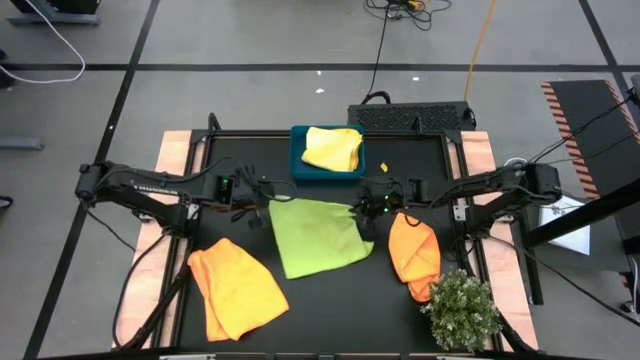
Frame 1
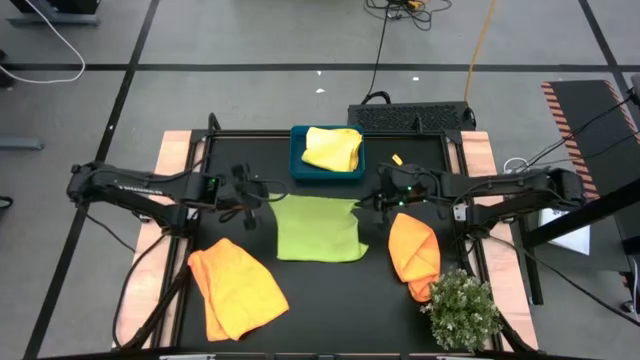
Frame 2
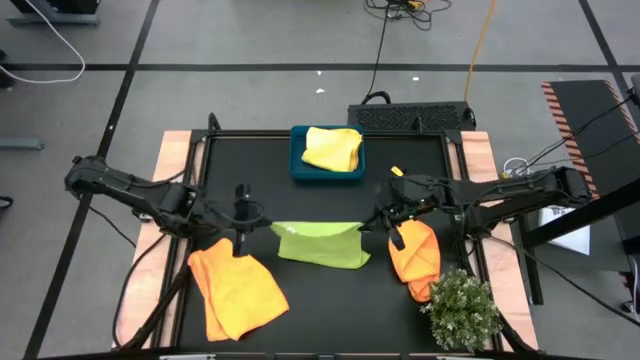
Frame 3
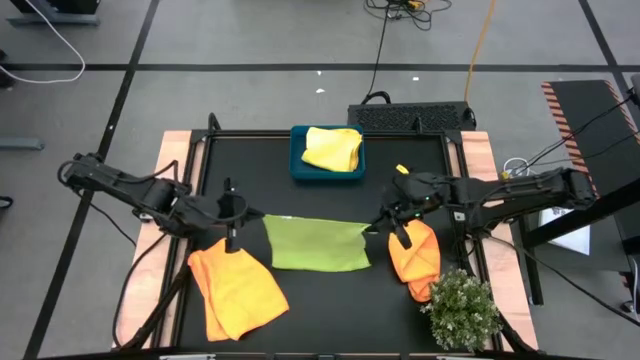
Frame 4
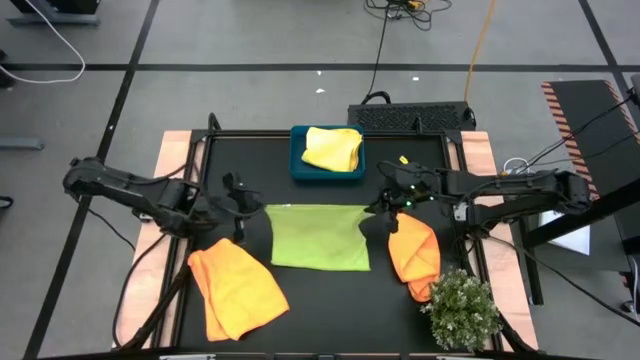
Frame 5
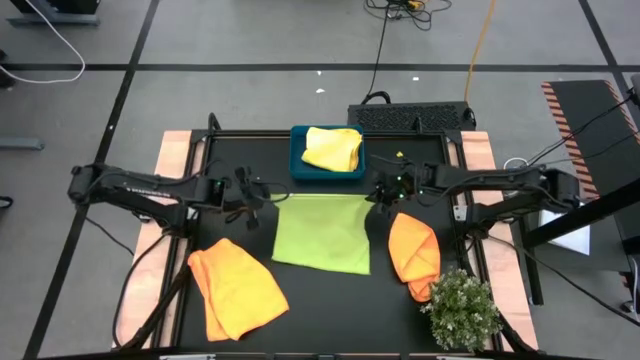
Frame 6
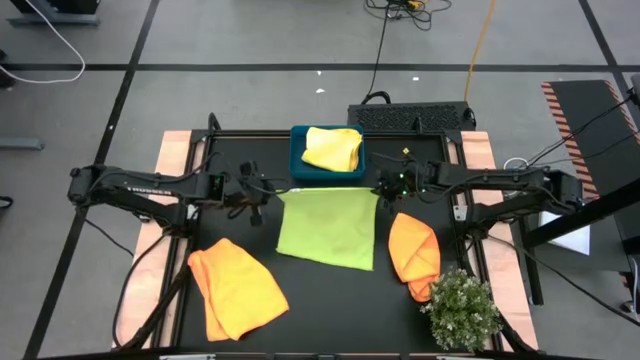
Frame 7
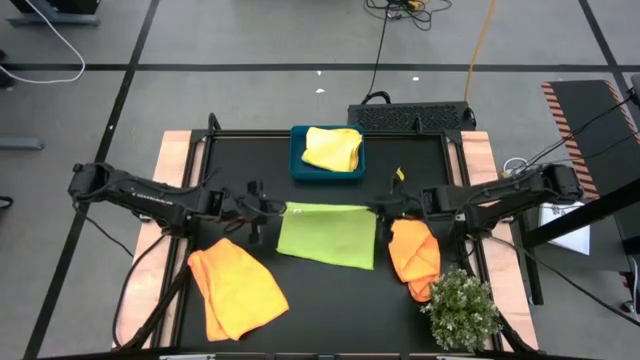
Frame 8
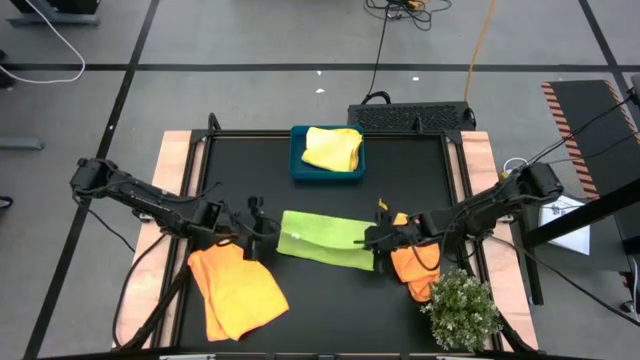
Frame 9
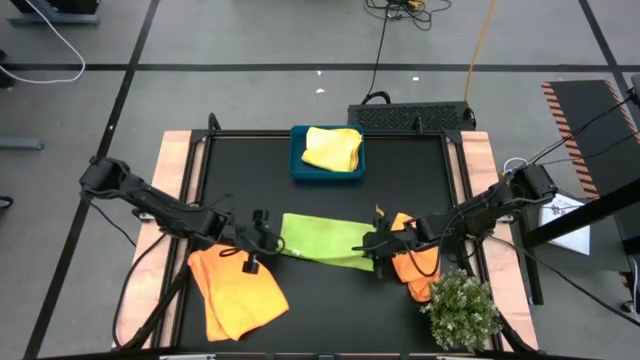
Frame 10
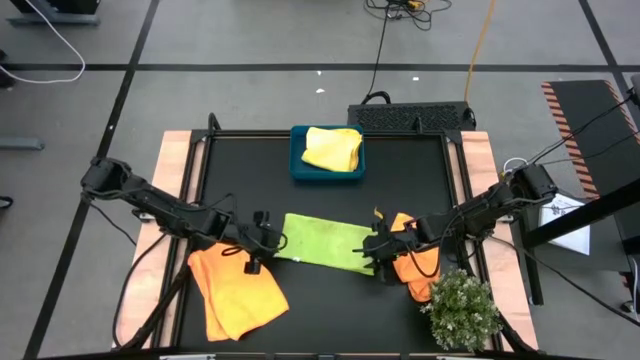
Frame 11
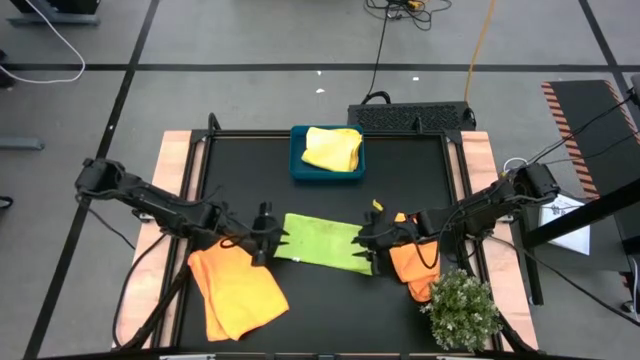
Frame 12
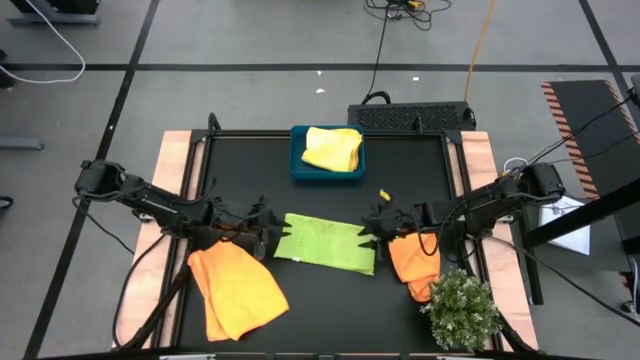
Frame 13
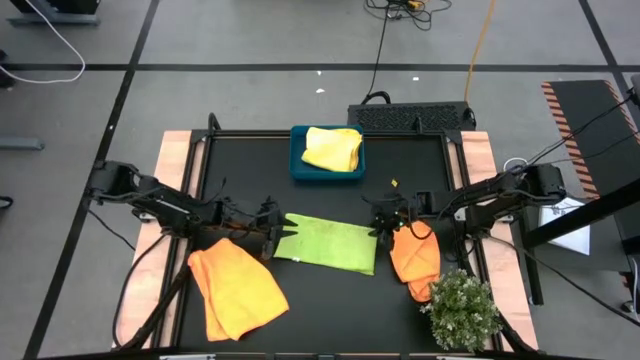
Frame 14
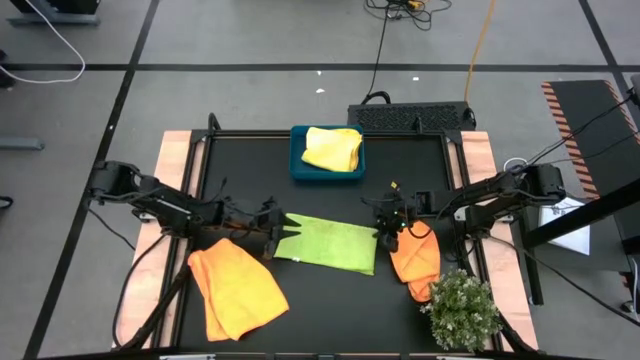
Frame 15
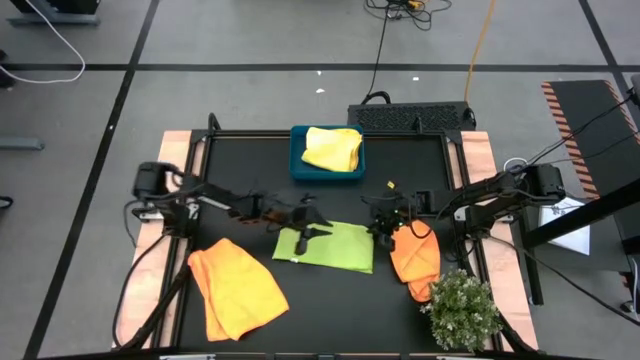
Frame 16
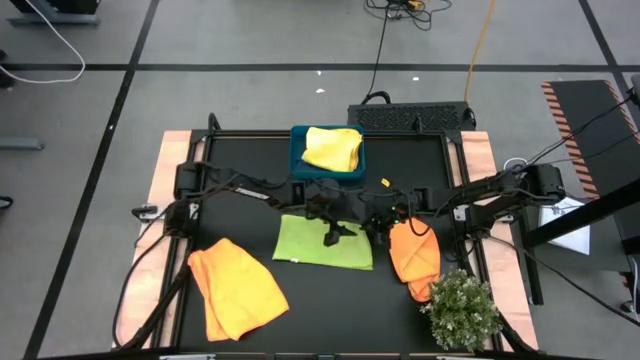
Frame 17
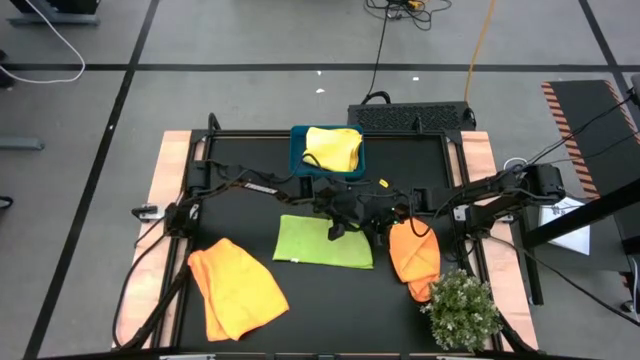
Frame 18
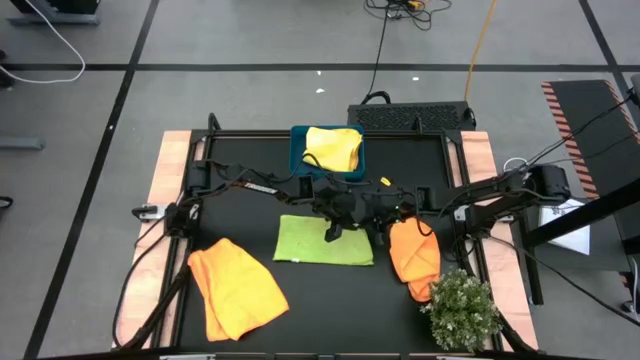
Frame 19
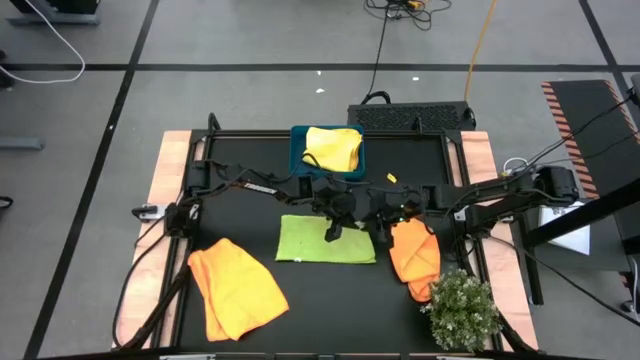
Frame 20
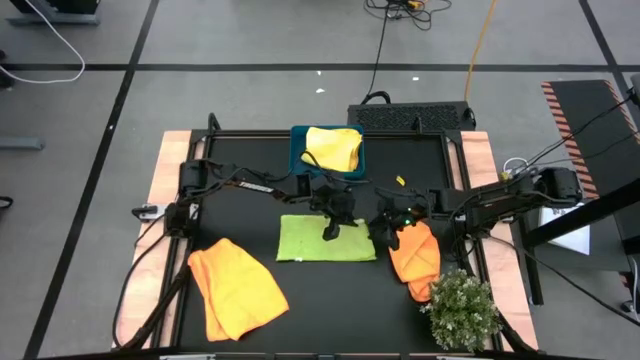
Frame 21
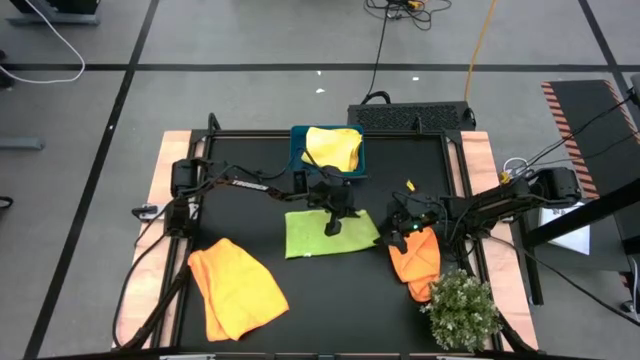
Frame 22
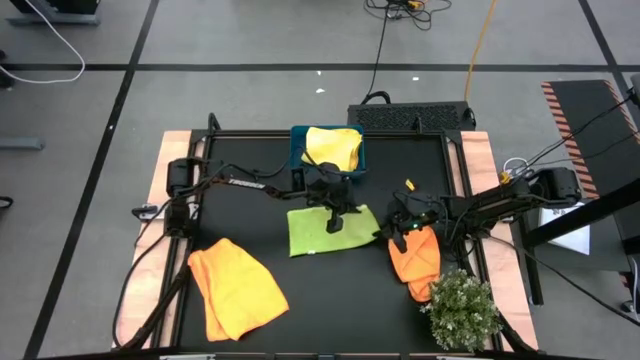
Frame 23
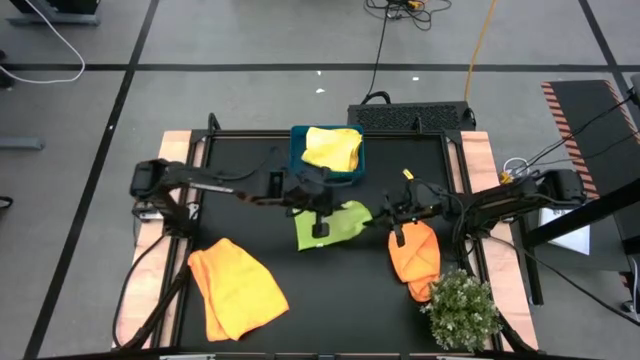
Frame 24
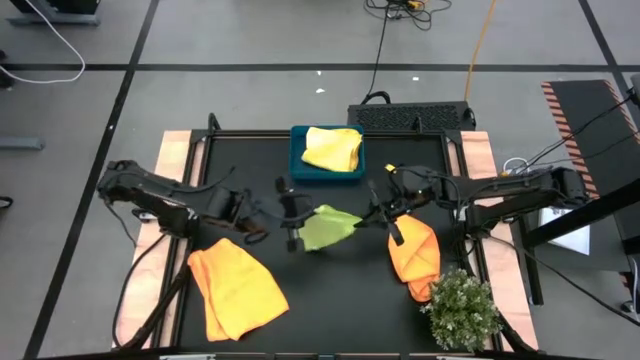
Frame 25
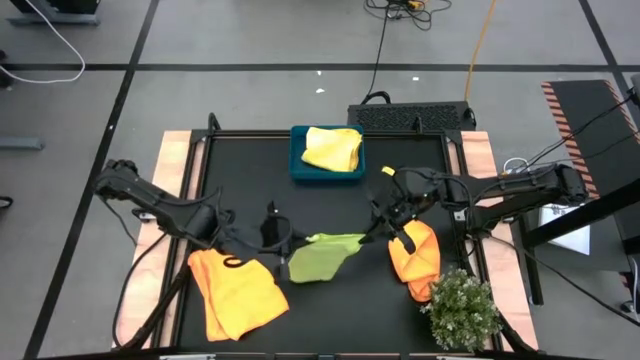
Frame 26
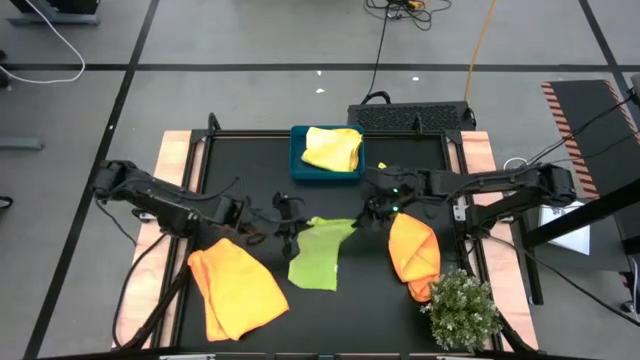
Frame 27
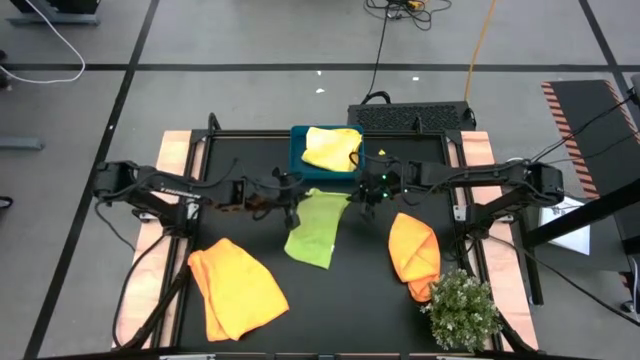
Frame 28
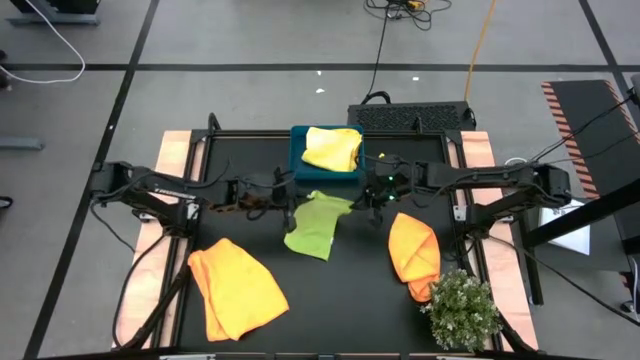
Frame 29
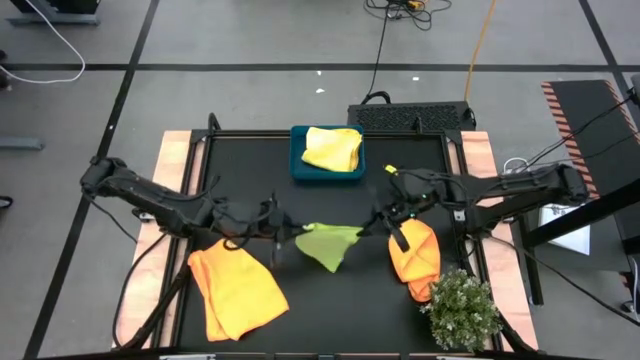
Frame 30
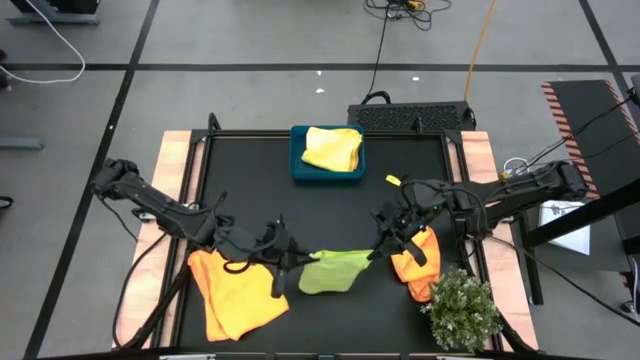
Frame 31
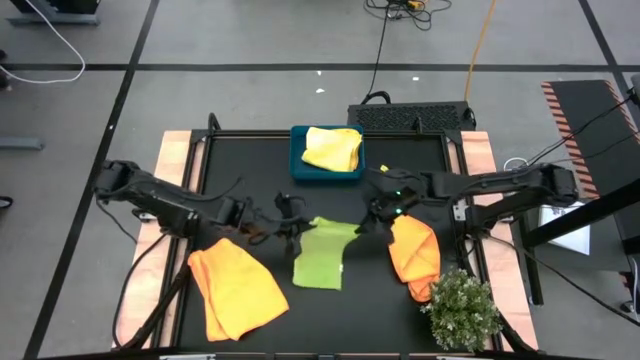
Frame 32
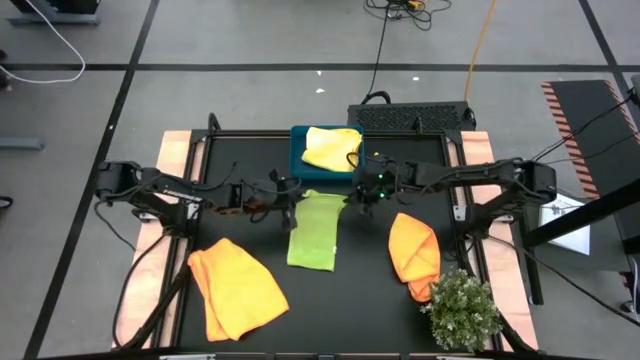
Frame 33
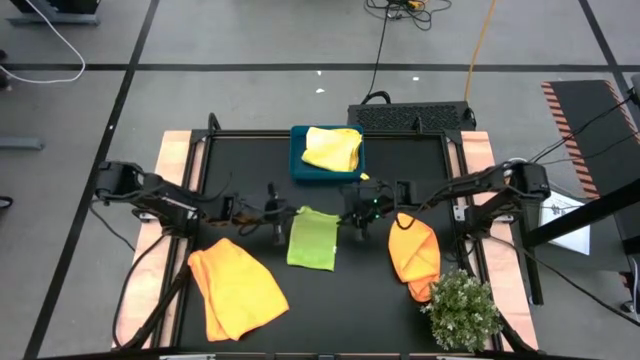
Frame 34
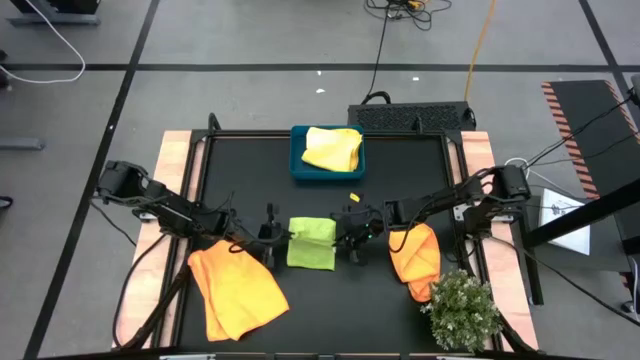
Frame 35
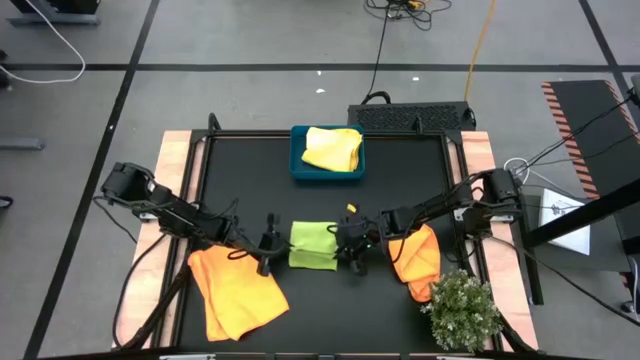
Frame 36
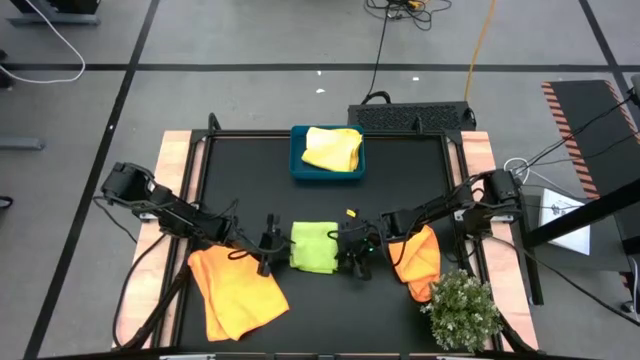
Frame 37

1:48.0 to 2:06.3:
Task: Fold microfiber towels
Fold the green microfiber towel

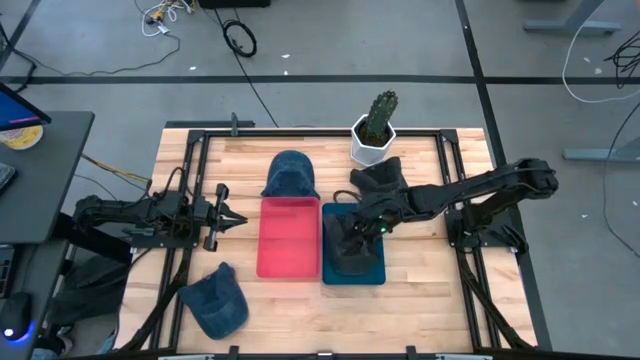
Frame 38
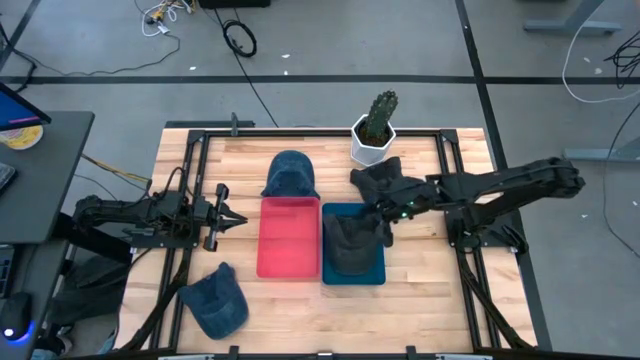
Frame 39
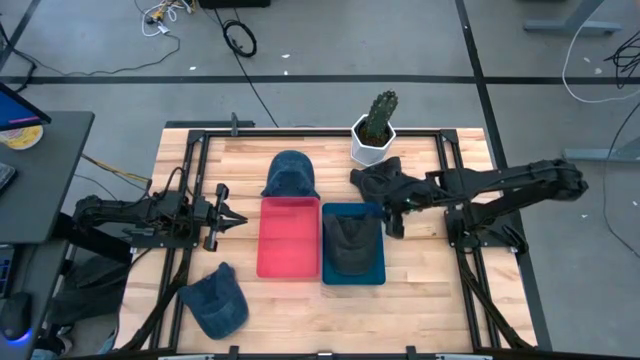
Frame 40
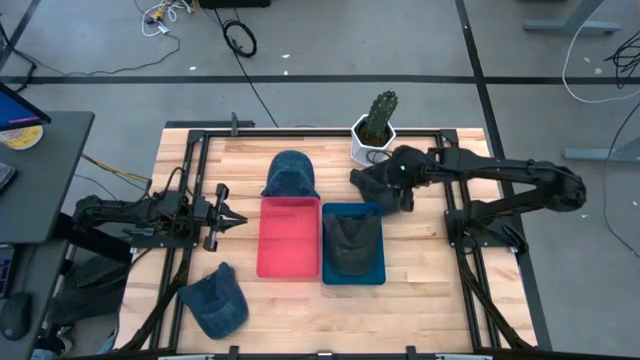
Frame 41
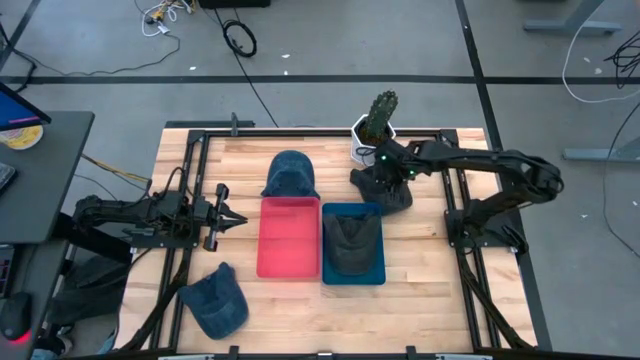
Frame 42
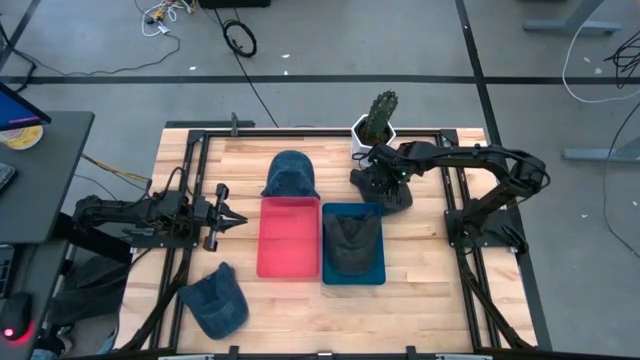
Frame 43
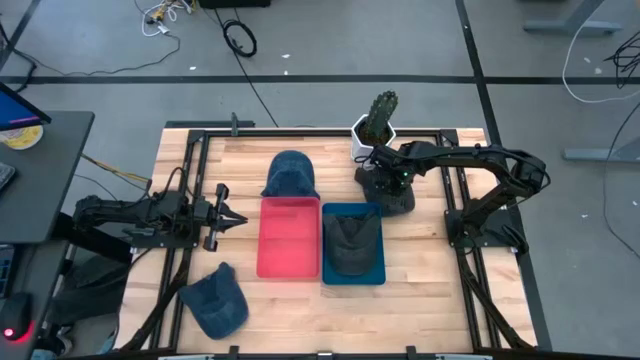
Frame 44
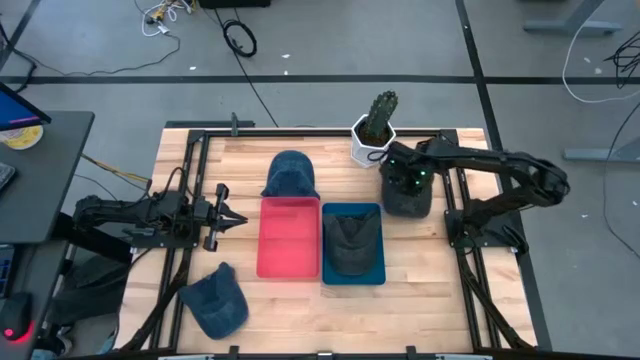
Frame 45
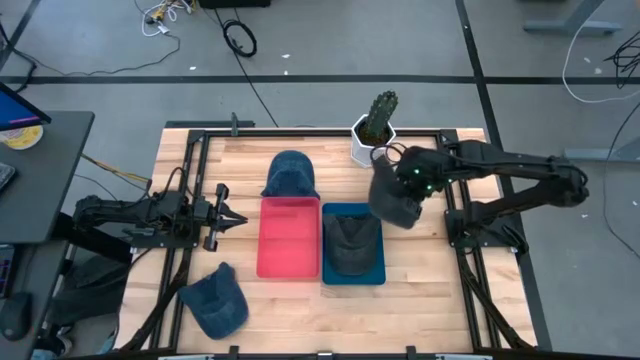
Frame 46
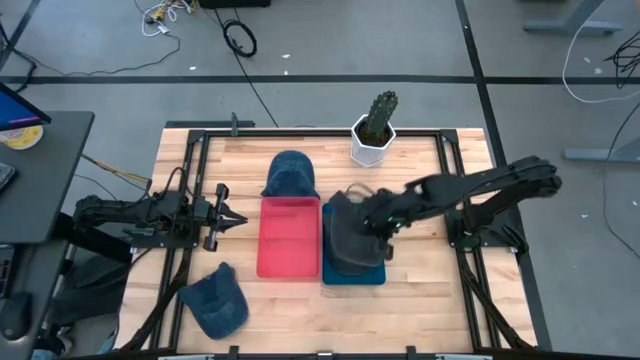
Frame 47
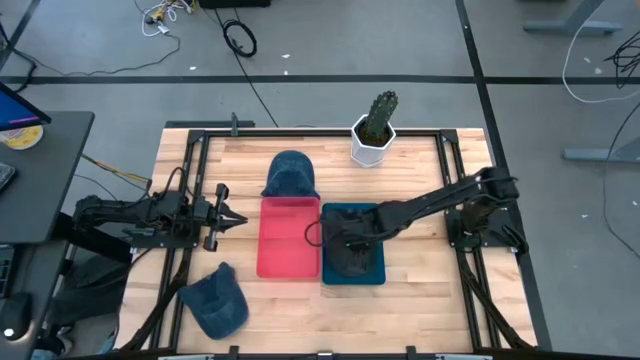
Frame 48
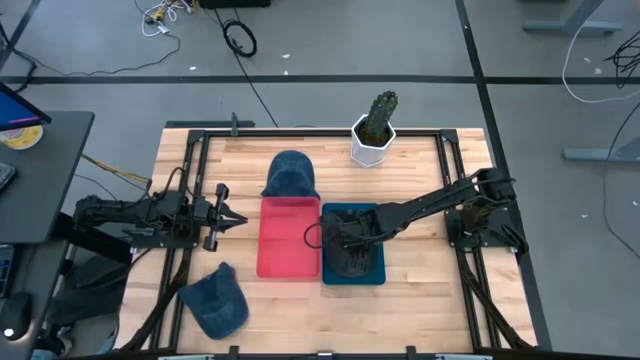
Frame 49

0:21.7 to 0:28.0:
Task: Pick & Place hat
Put the gray cap into the blue bin
